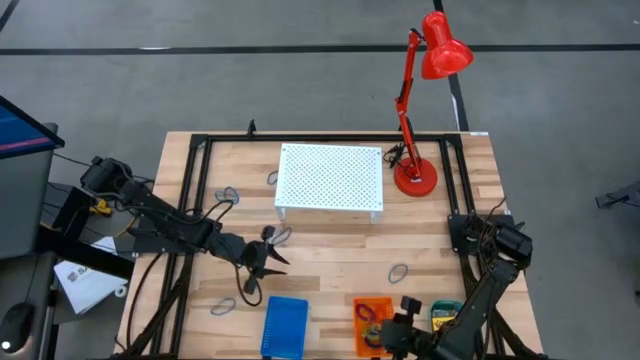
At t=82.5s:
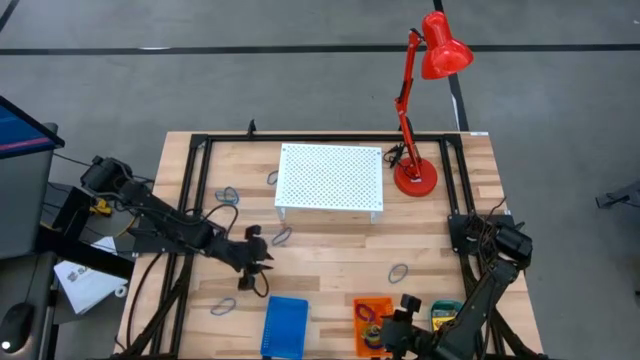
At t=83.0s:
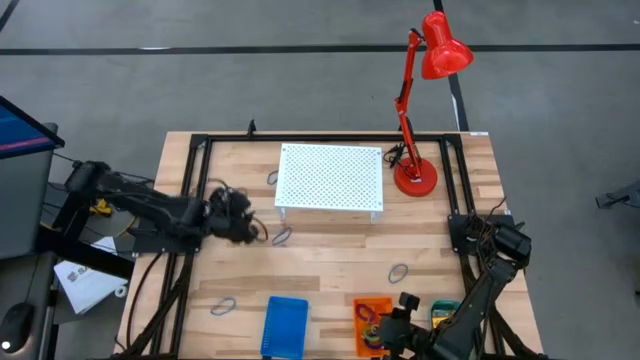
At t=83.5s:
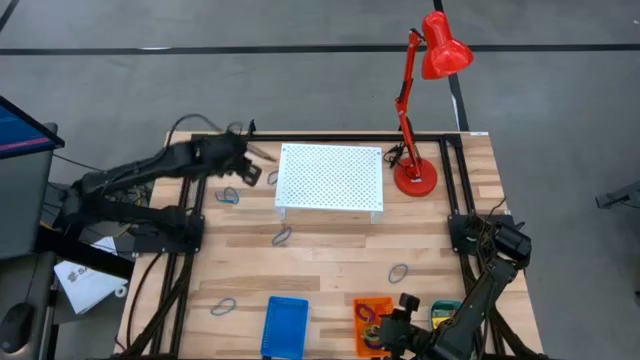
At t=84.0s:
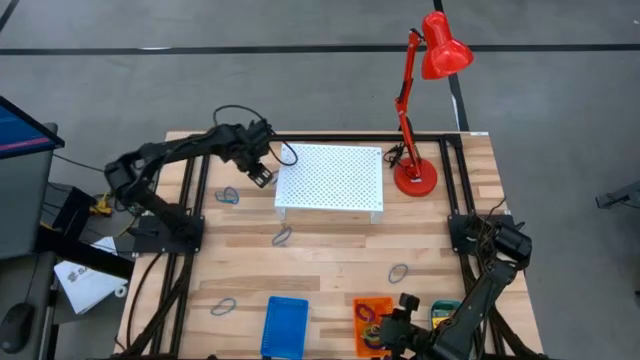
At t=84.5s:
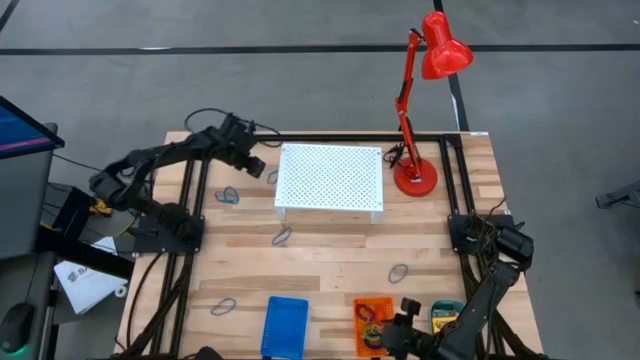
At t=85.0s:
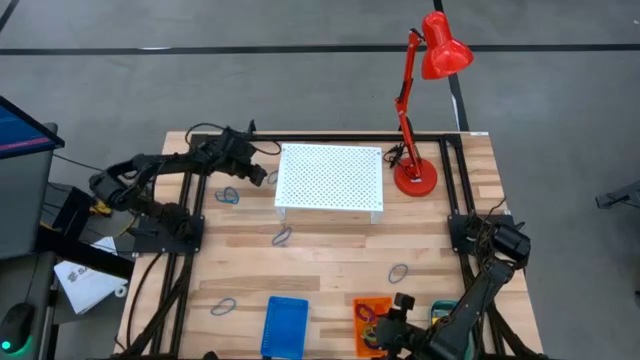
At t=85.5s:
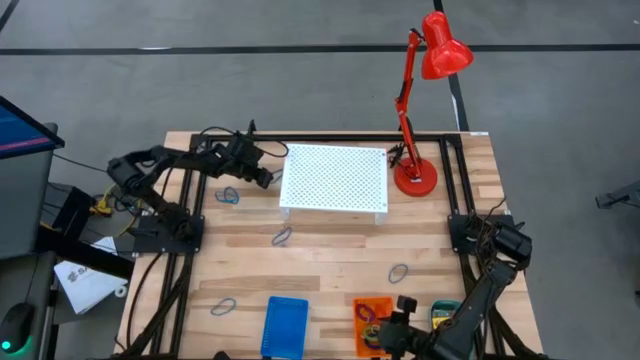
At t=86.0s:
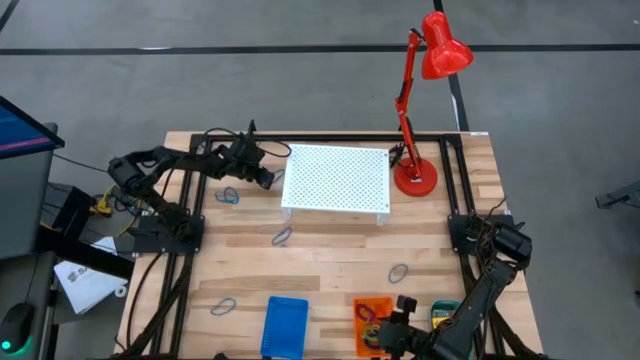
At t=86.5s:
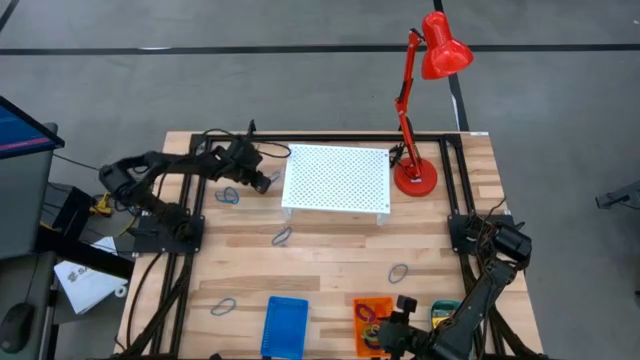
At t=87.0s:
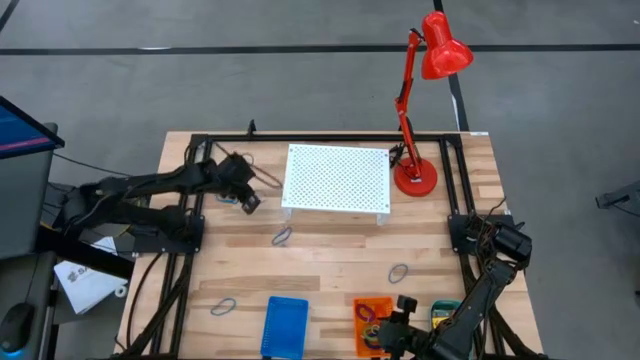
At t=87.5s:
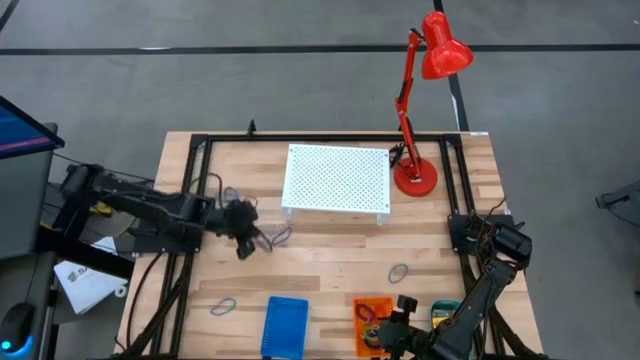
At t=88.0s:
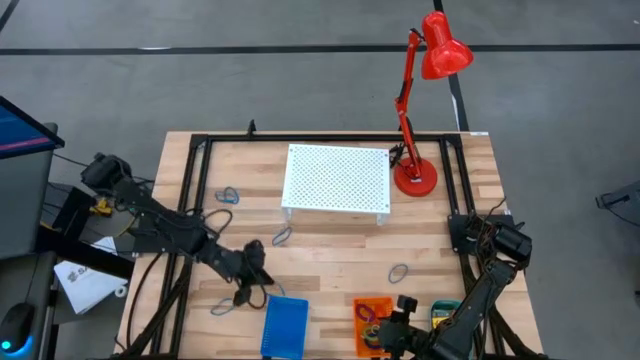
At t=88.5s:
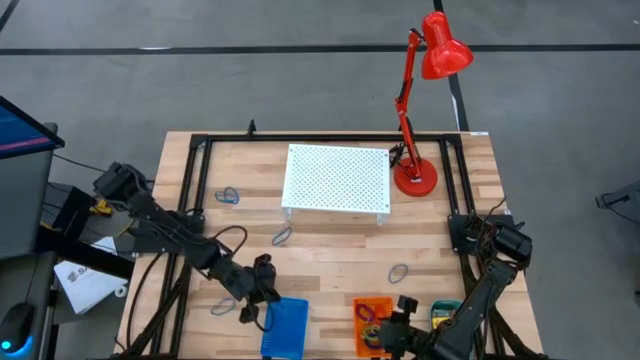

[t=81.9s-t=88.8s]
Task: Pick & Place Office Desk Supplies
Put the blue rubber band into the blue bin

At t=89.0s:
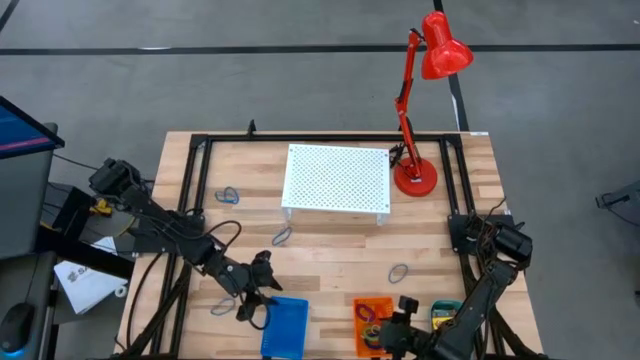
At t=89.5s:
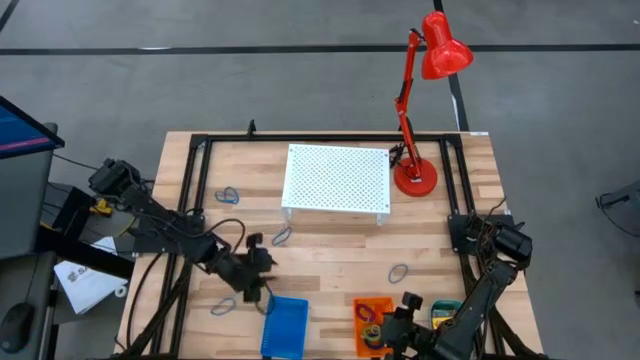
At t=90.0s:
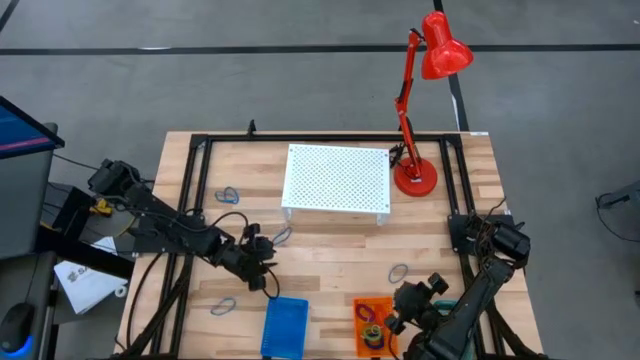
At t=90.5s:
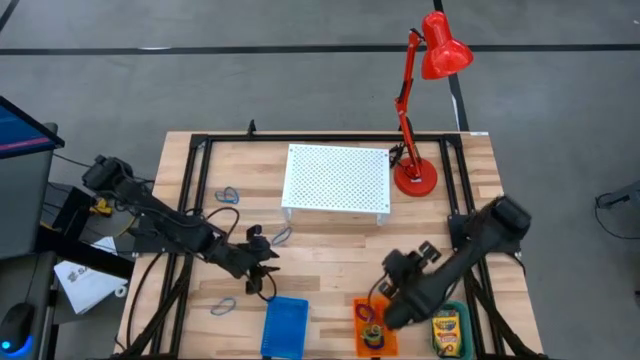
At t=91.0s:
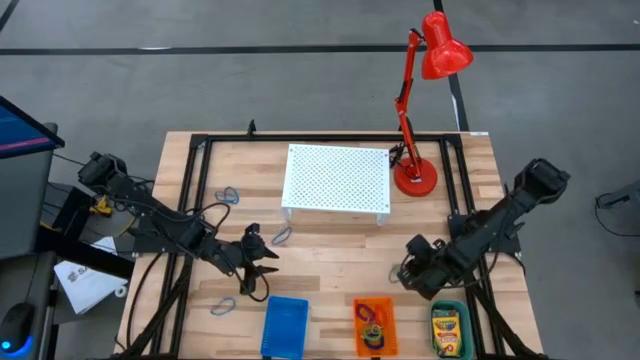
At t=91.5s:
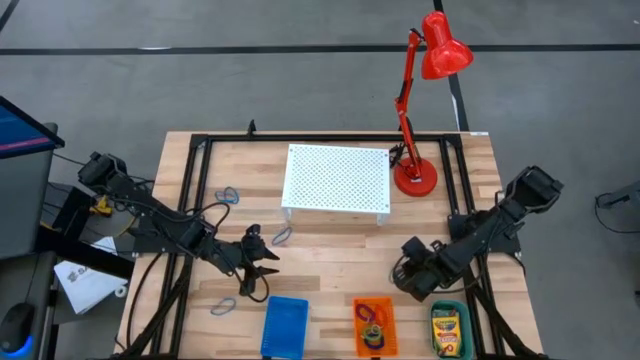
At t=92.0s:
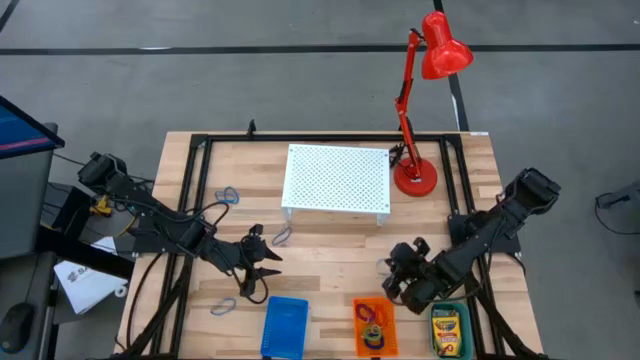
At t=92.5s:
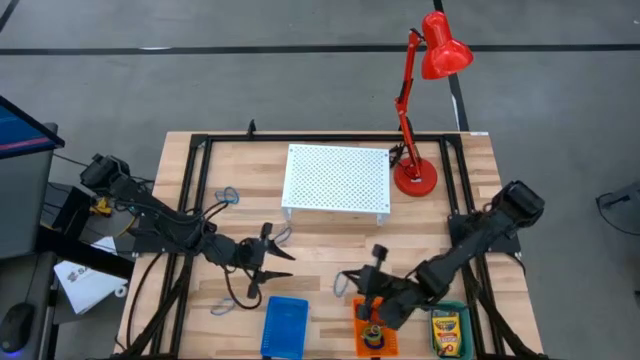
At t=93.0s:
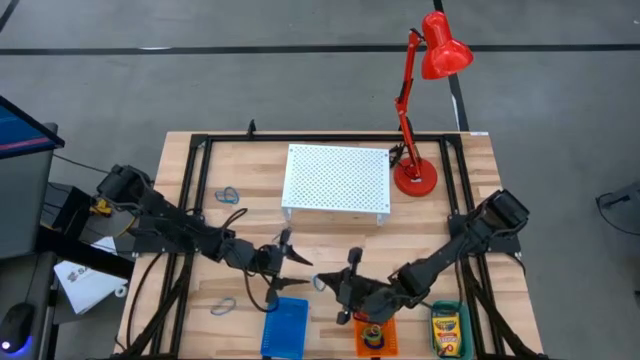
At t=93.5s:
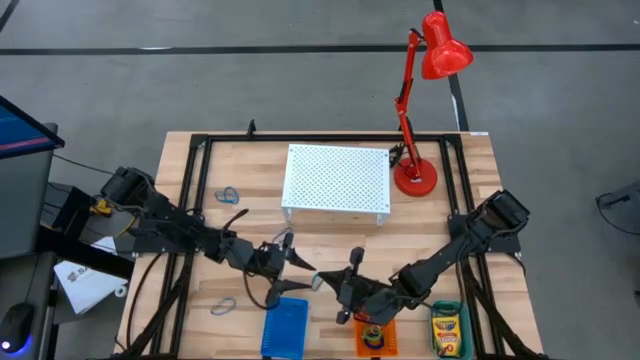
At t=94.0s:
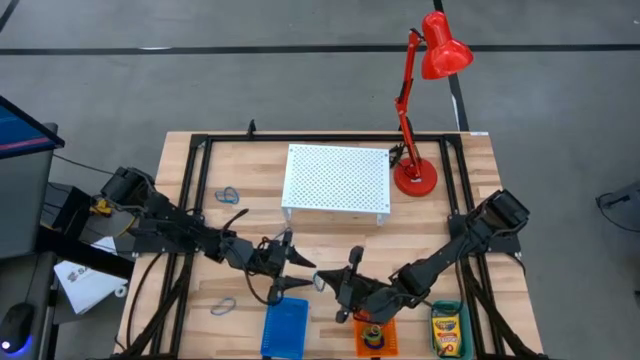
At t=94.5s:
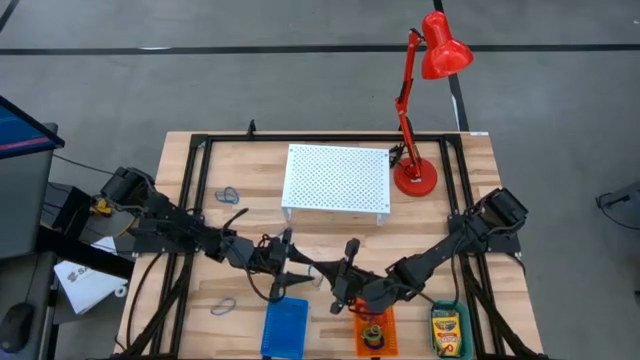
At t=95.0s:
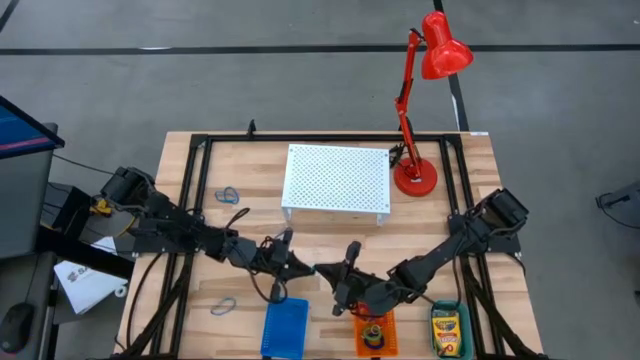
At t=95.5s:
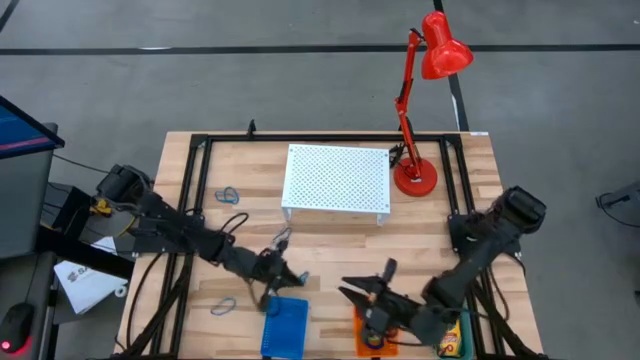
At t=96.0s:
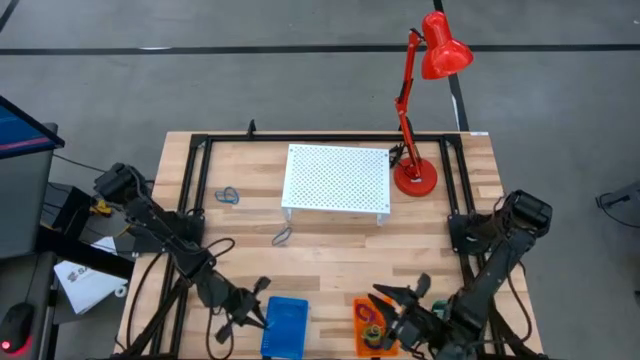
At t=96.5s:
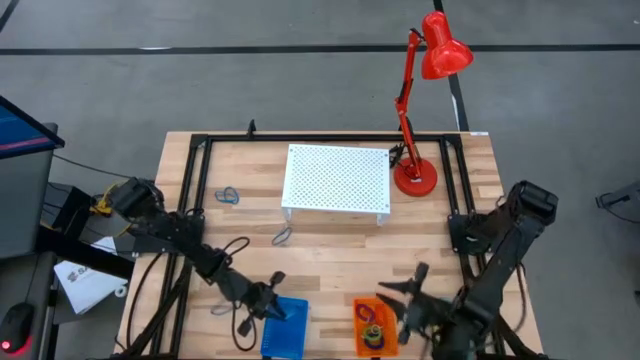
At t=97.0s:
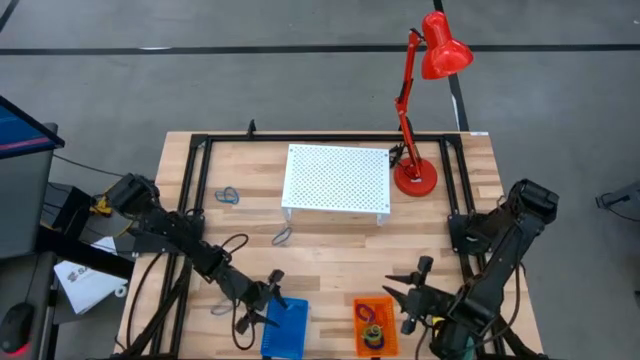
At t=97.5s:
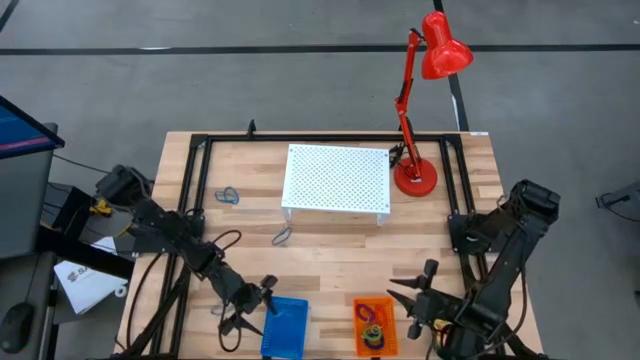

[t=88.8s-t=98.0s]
Put the blue rubber band into the blue bin

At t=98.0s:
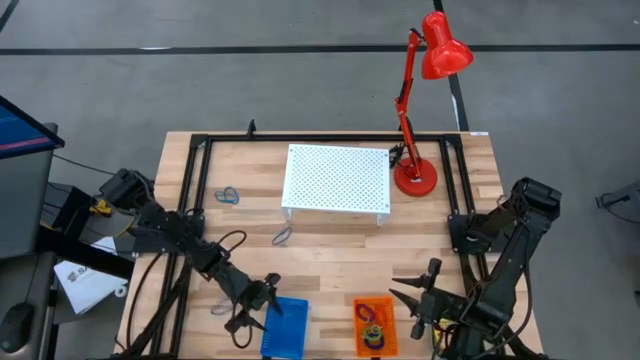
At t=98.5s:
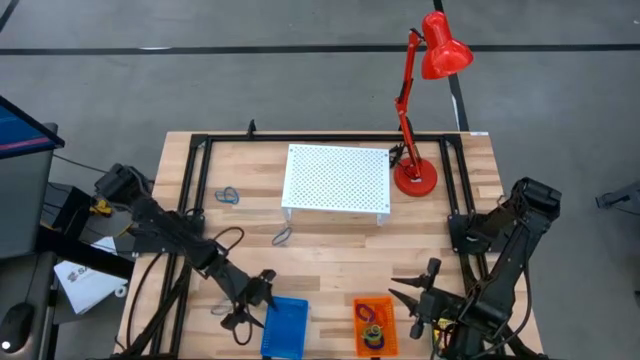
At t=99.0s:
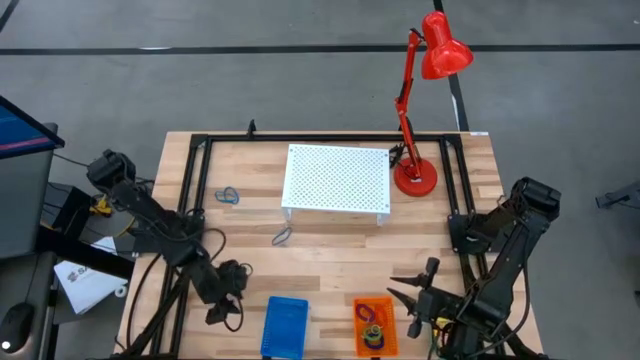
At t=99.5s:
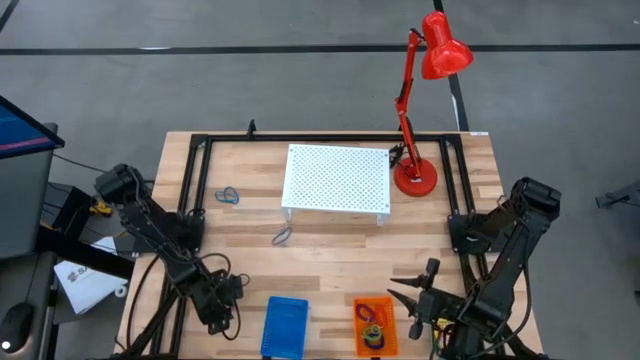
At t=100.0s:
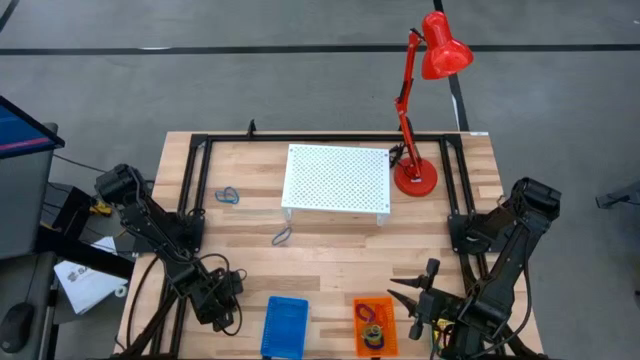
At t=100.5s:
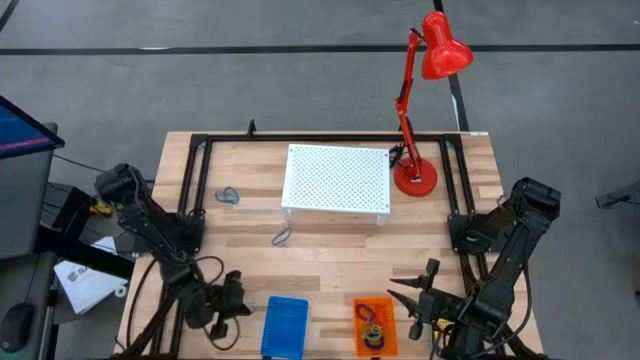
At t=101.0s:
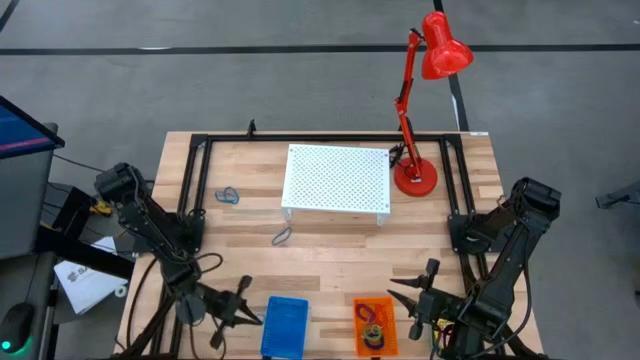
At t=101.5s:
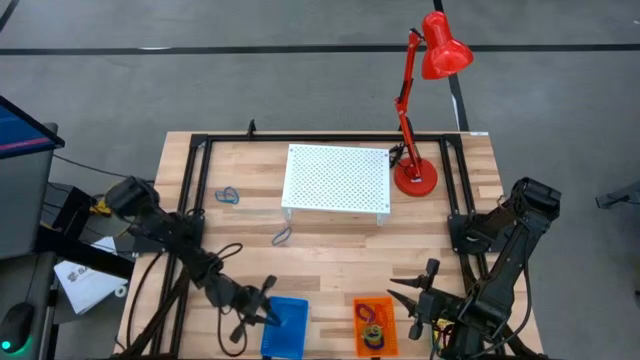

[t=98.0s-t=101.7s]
Put the blue rubber band into the blue bin
